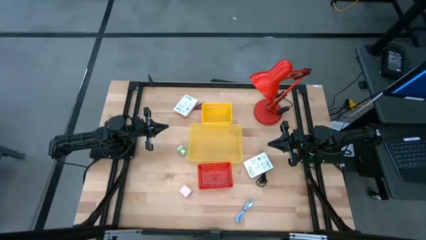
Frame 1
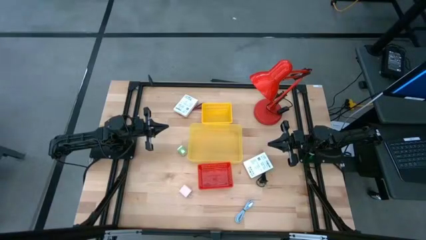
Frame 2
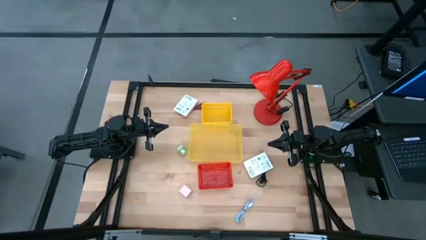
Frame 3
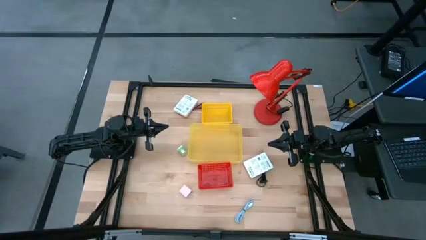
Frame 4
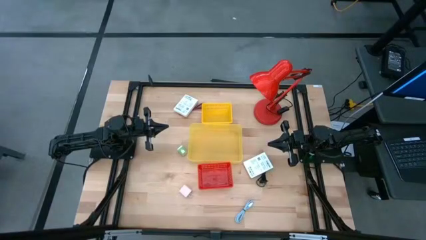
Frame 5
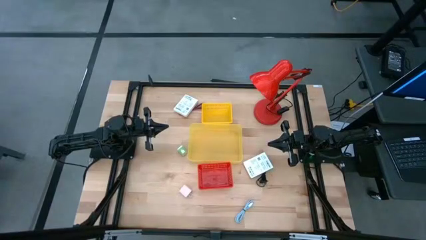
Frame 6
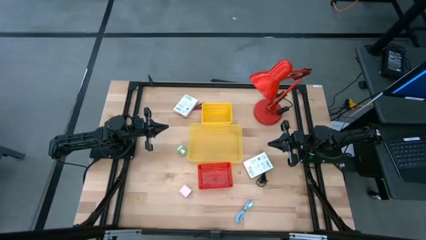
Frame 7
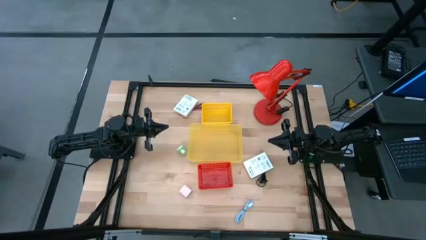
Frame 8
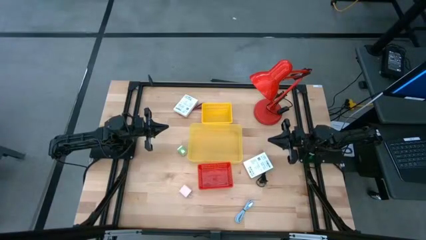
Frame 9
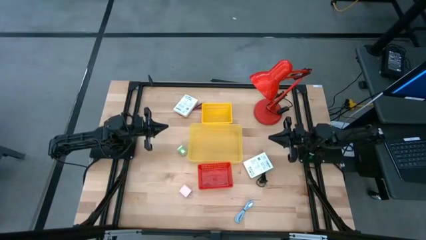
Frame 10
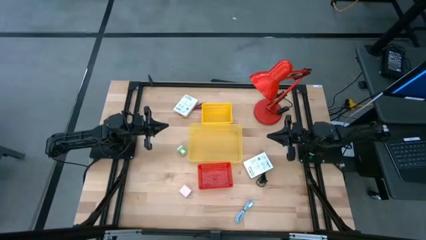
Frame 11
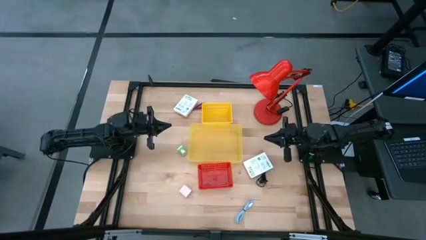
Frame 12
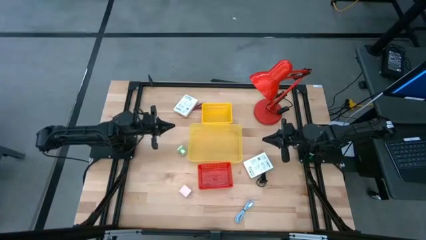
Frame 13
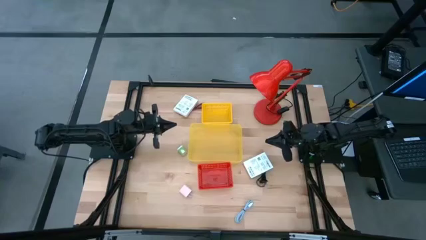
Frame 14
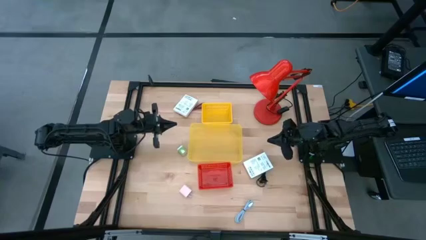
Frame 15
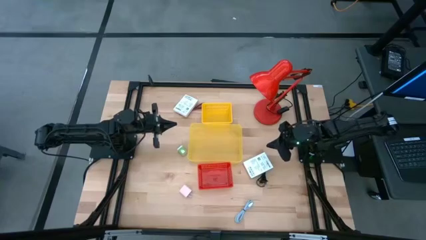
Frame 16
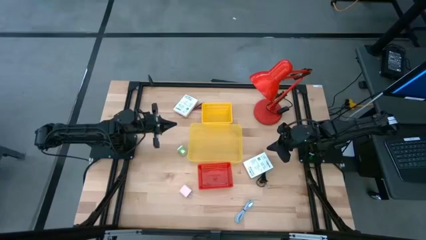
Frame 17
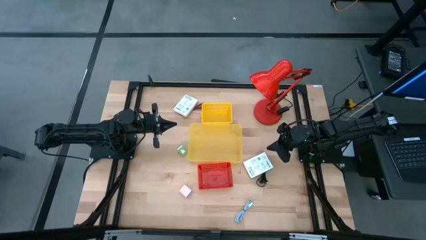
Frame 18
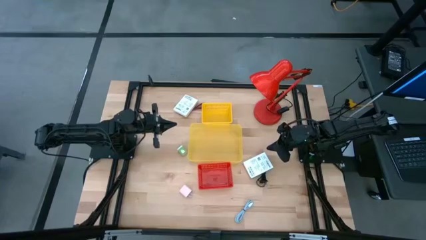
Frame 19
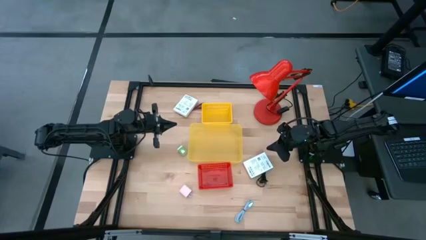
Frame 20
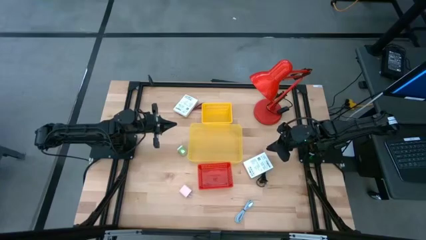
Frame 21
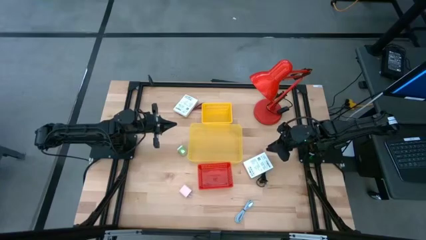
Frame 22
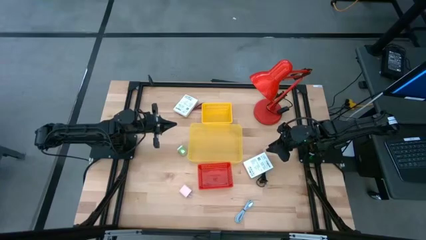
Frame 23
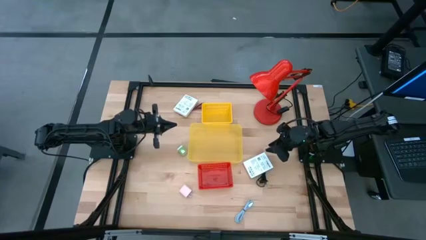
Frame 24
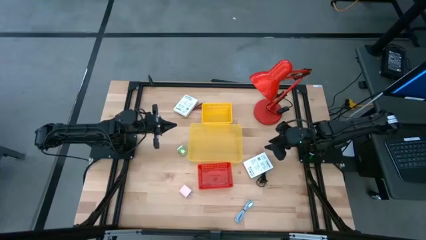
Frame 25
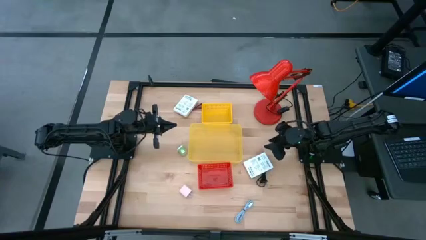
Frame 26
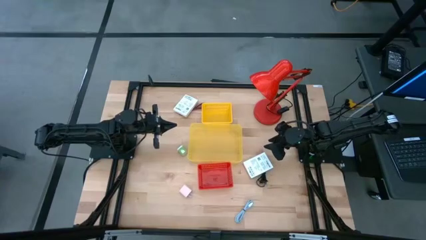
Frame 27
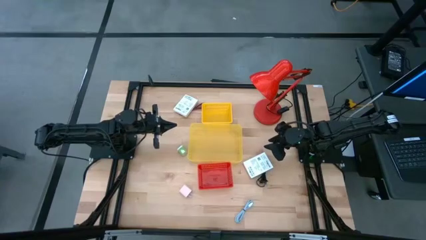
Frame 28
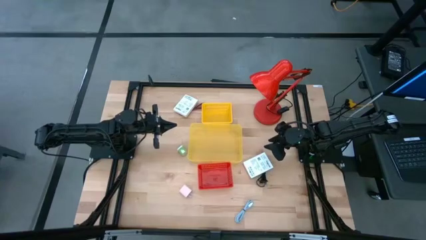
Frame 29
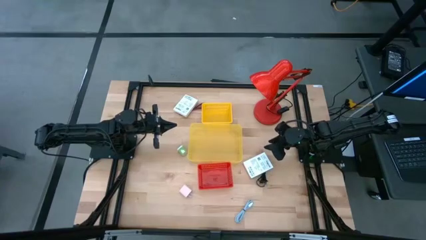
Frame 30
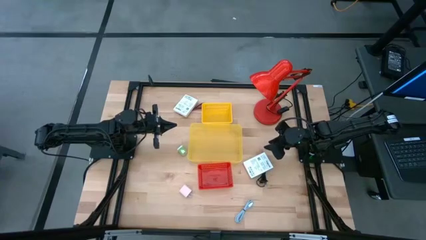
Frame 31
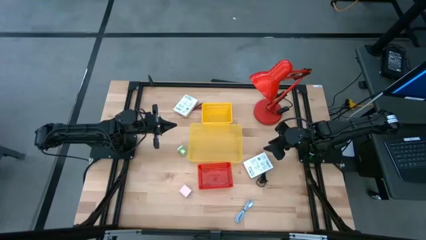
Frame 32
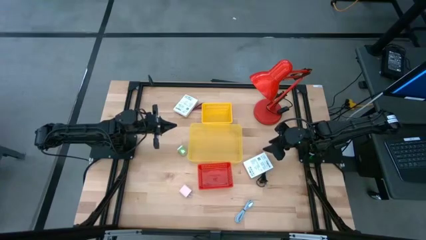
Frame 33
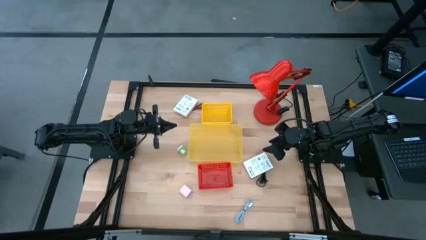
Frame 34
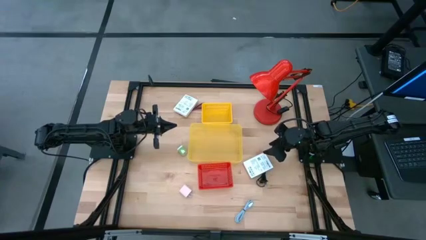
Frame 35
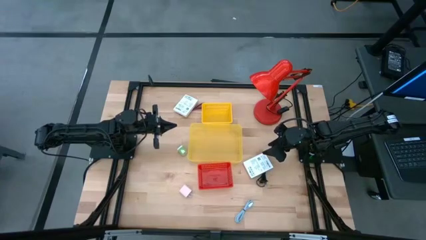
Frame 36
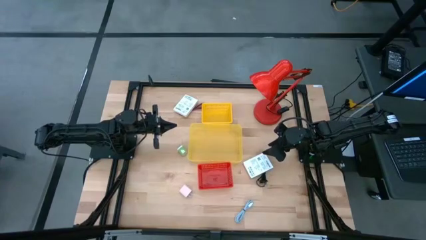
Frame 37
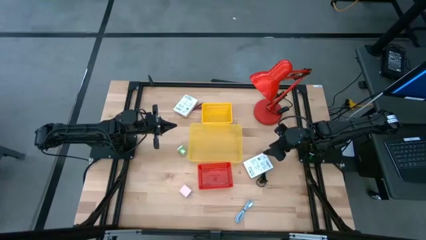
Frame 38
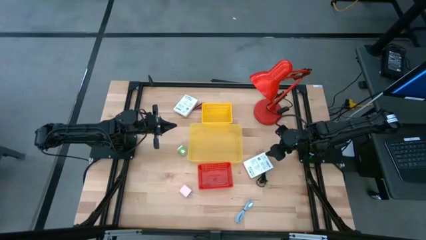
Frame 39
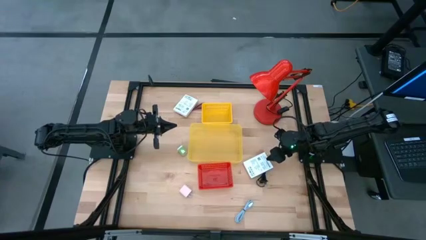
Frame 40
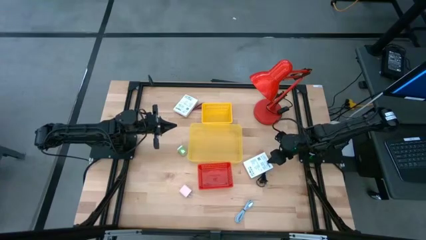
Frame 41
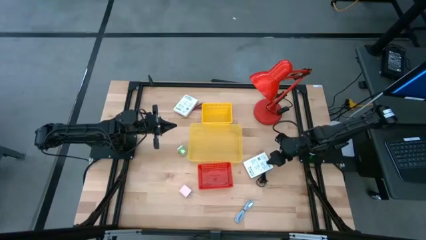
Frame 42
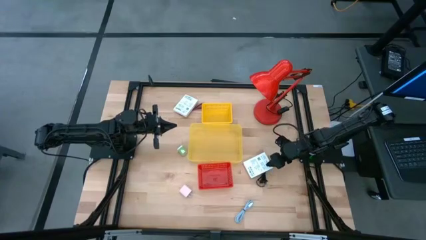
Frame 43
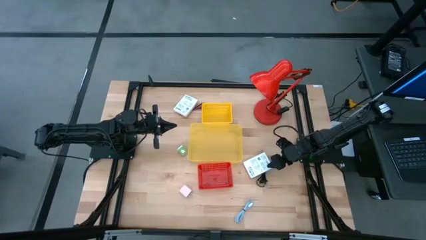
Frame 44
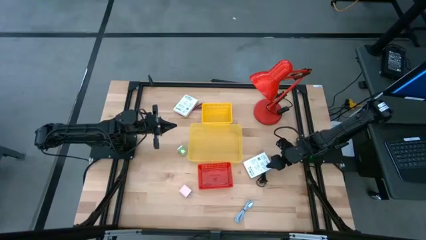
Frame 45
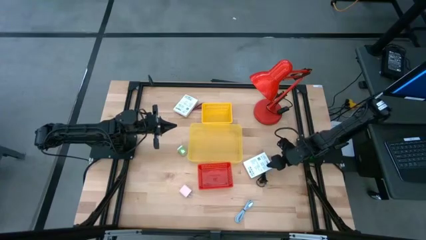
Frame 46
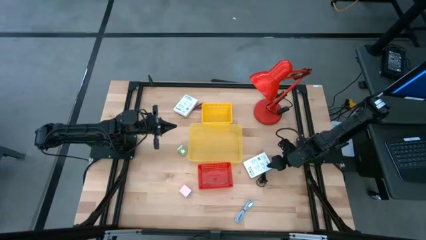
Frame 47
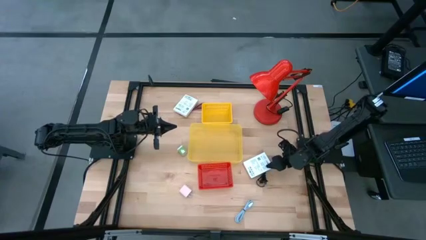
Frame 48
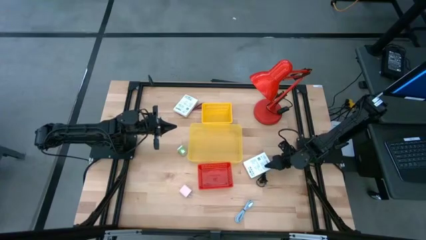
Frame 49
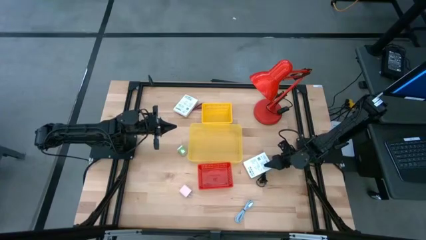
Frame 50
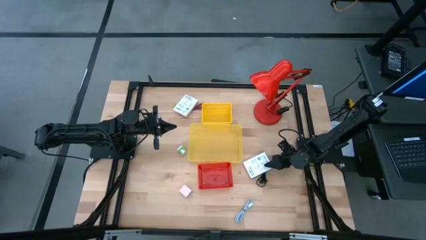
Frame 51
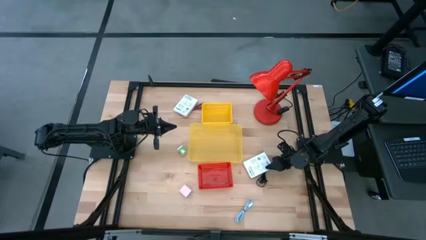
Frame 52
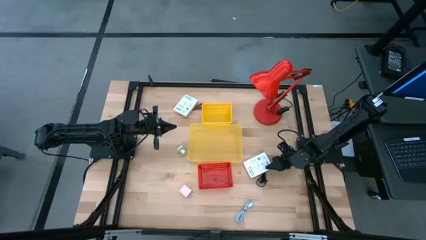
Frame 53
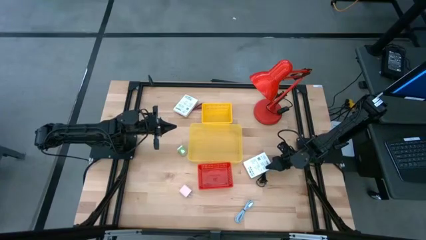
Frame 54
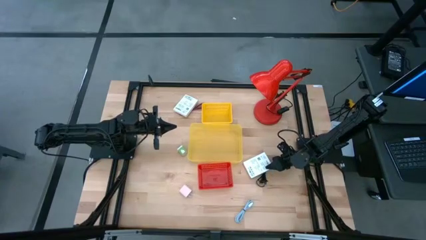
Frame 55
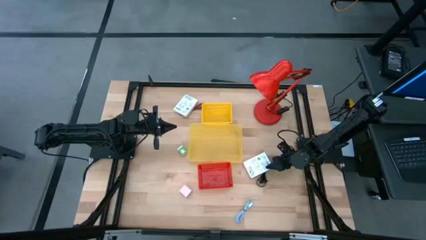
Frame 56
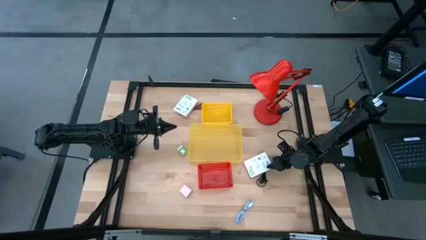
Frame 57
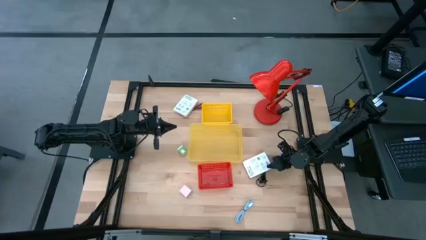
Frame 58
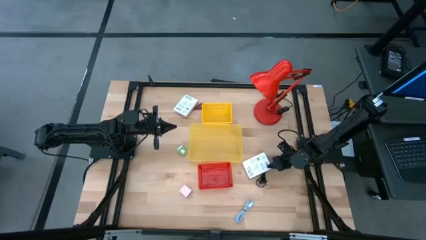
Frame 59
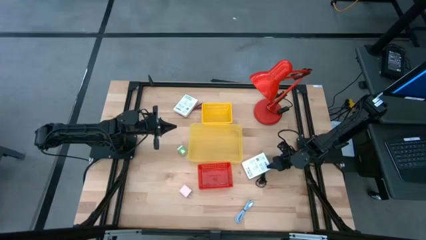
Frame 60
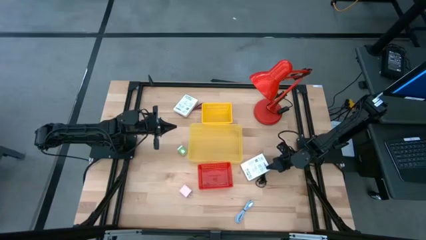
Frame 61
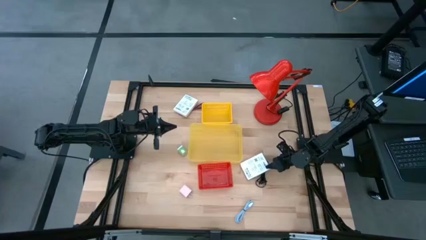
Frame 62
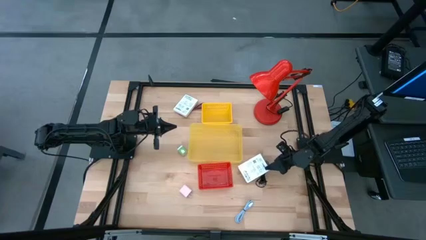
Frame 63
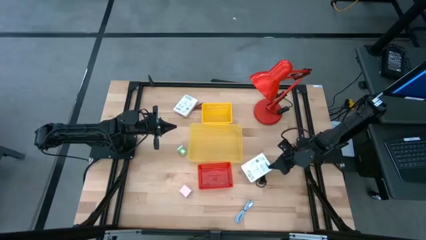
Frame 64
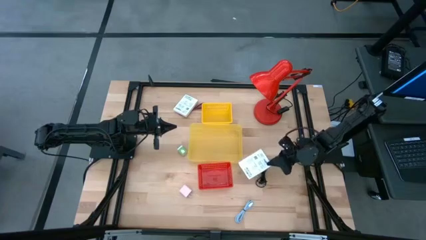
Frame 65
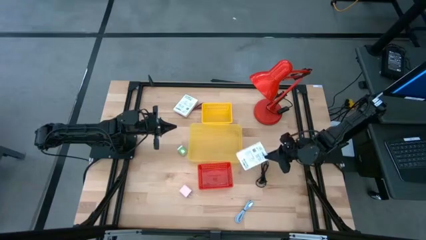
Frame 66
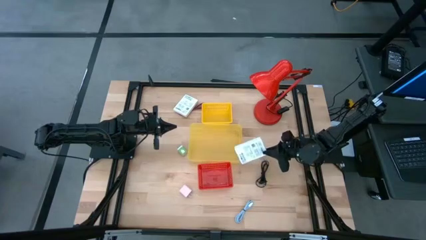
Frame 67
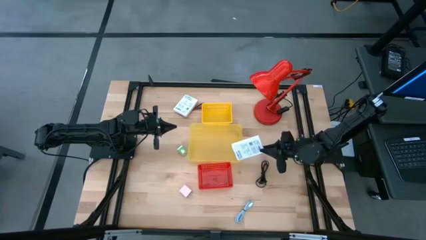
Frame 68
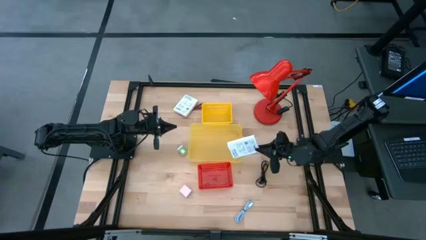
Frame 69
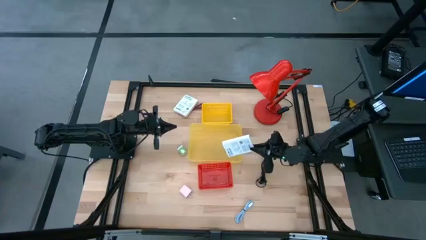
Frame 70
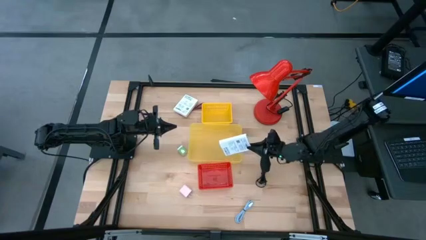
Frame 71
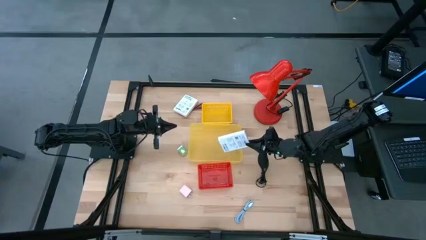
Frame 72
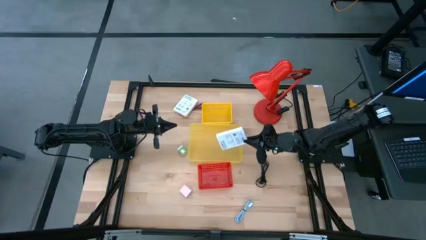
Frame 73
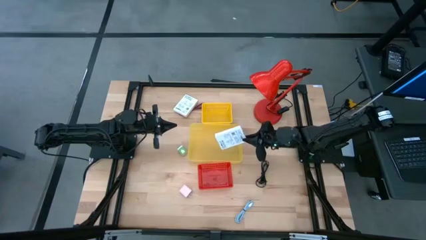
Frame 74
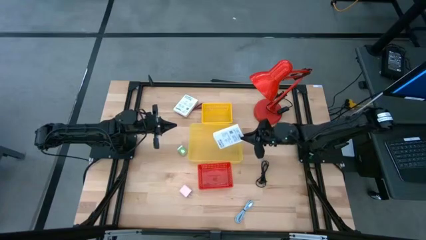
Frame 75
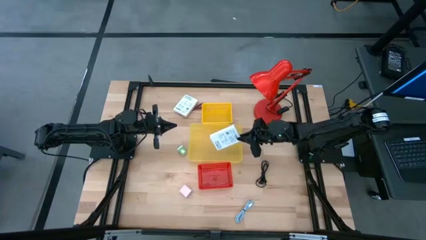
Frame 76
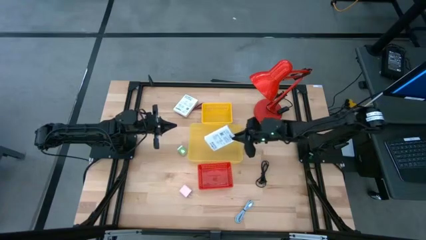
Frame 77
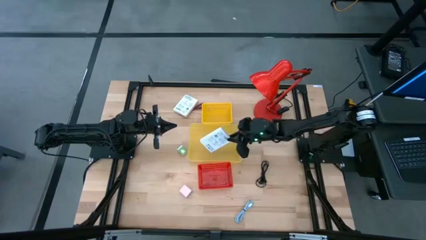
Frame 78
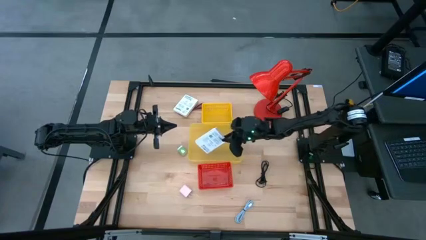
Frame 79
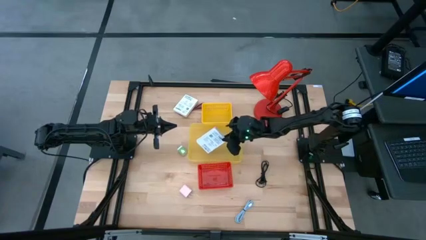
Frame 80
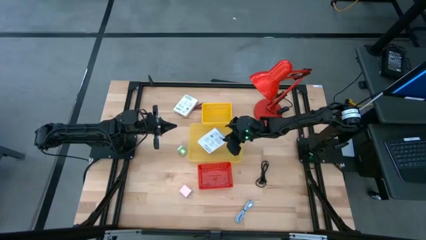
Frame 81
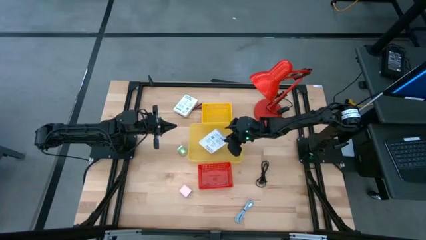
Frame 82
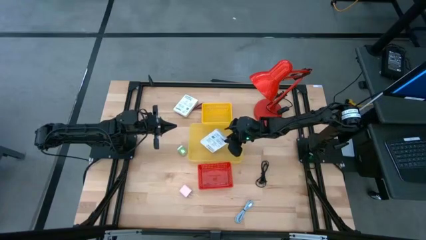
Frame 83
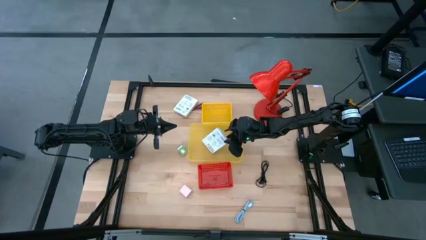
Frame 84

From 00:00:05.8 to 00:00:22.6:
Task: Pick and place items into bin
Put the white card reader box into the yellow transparent bin
